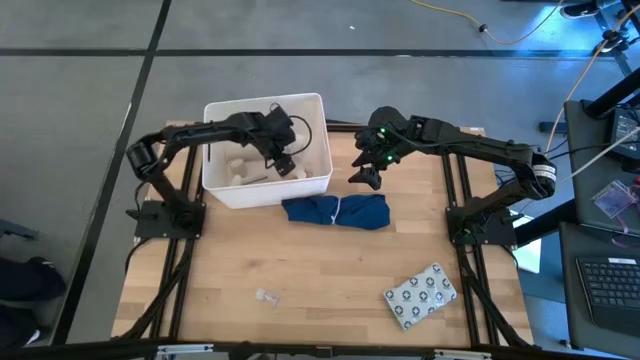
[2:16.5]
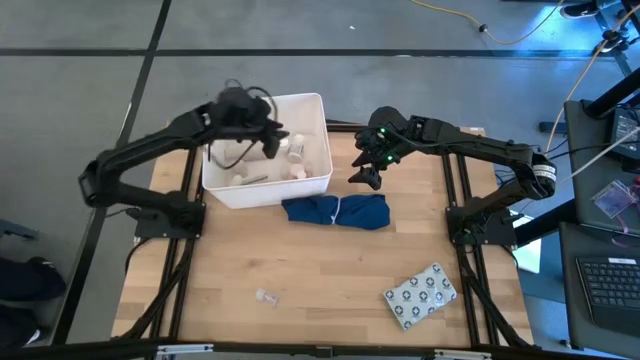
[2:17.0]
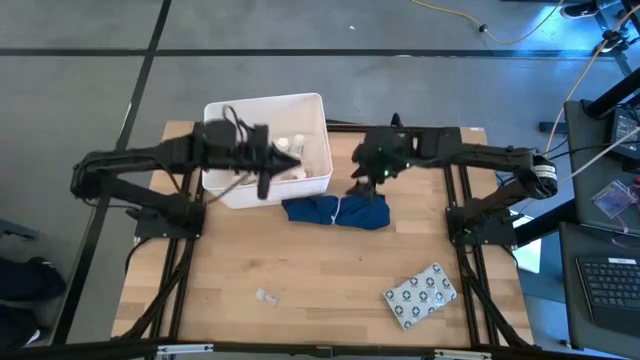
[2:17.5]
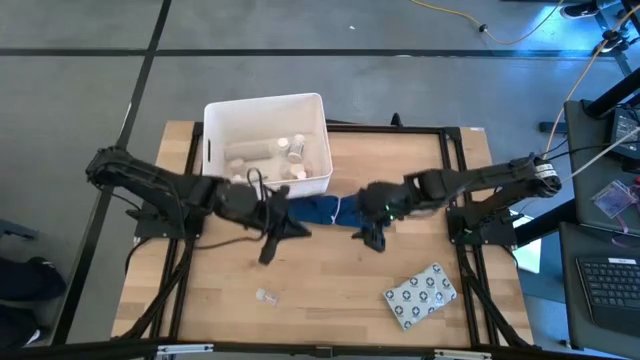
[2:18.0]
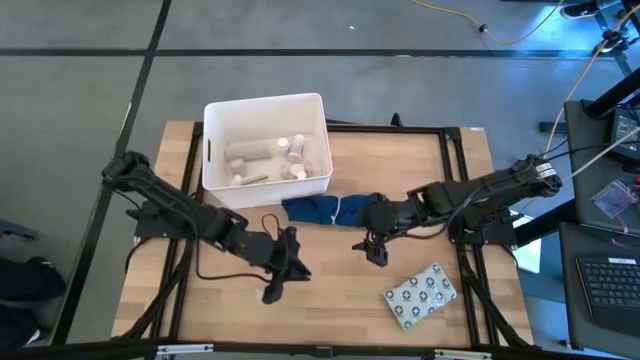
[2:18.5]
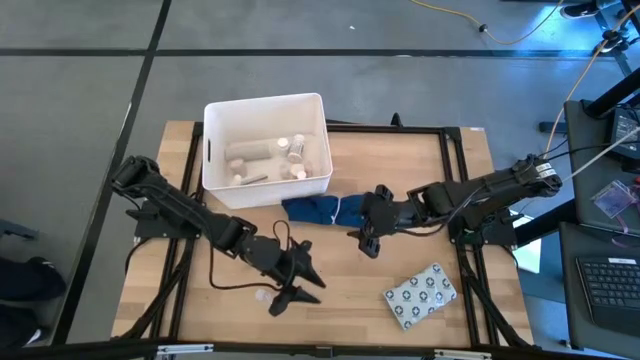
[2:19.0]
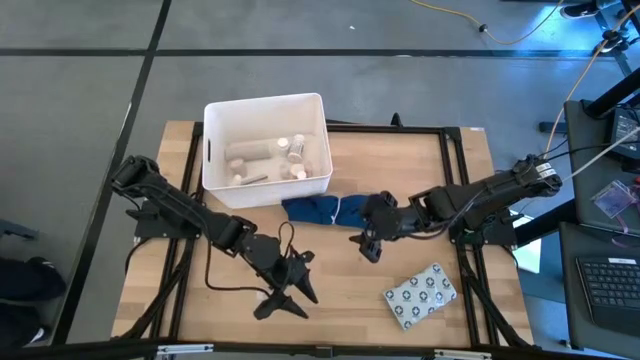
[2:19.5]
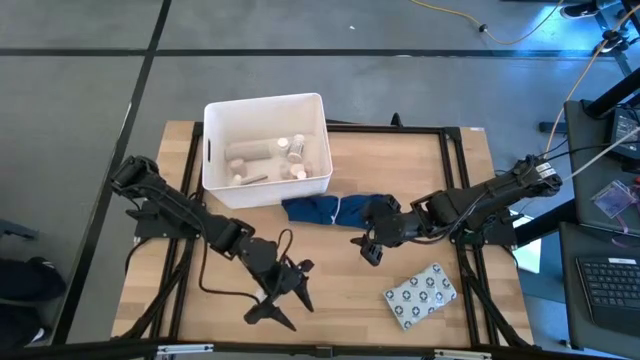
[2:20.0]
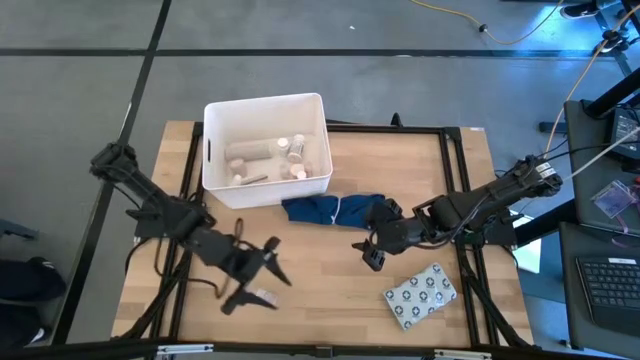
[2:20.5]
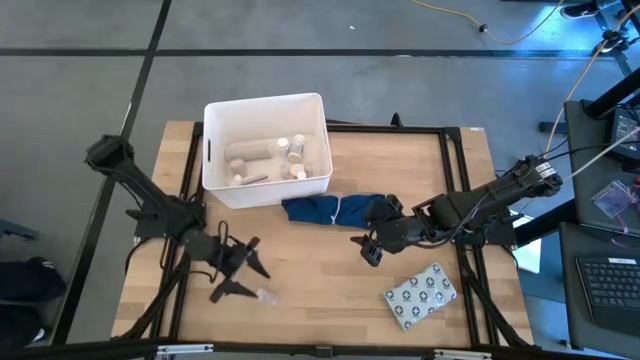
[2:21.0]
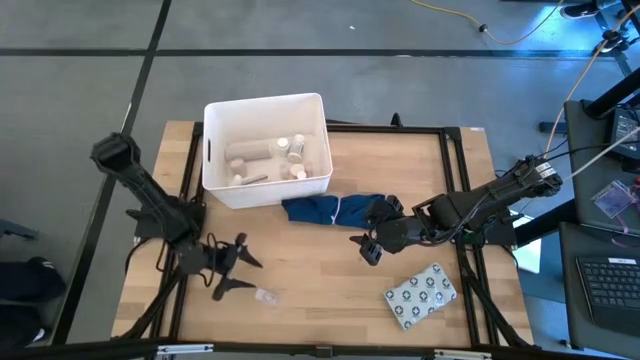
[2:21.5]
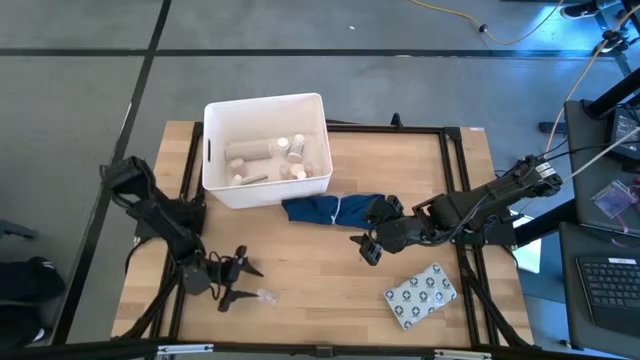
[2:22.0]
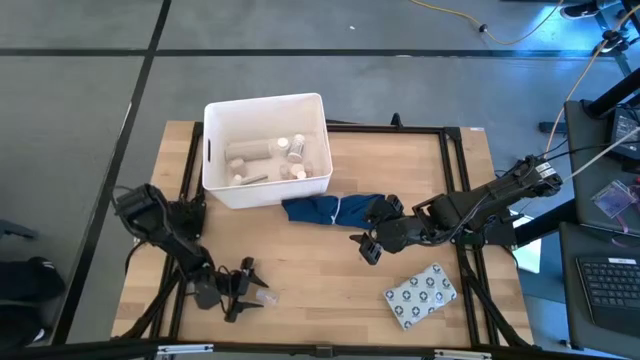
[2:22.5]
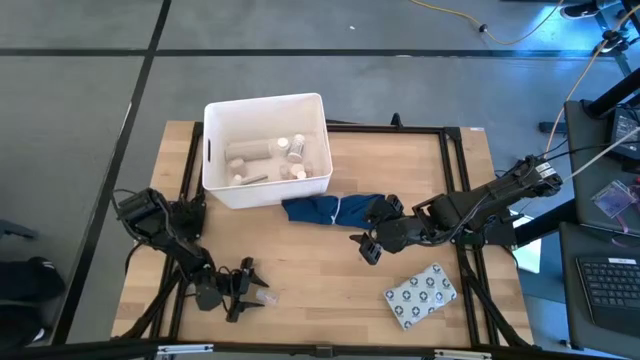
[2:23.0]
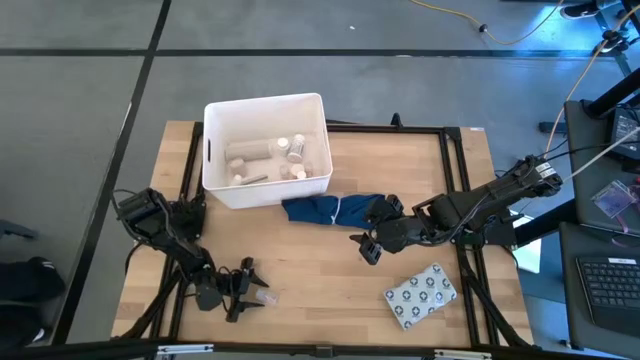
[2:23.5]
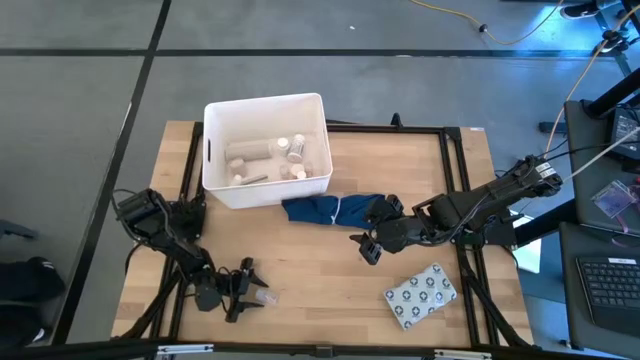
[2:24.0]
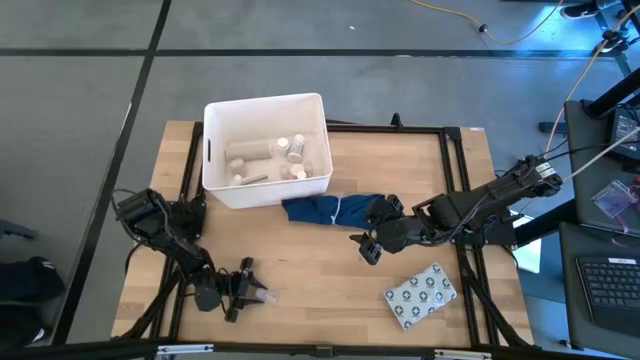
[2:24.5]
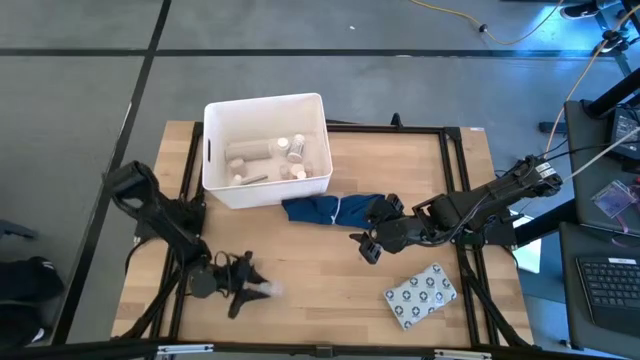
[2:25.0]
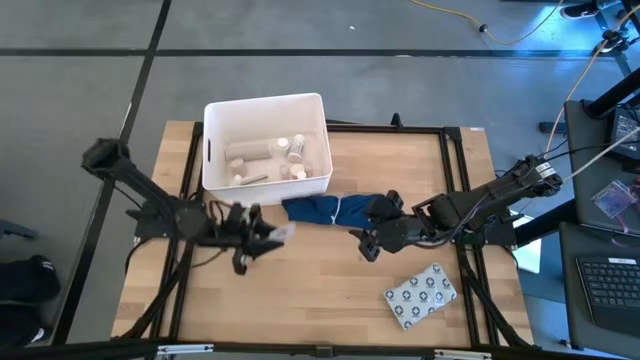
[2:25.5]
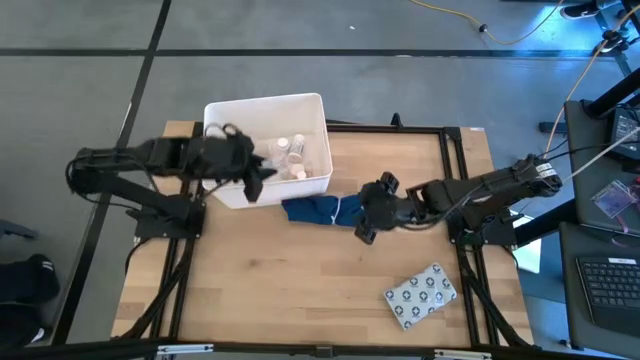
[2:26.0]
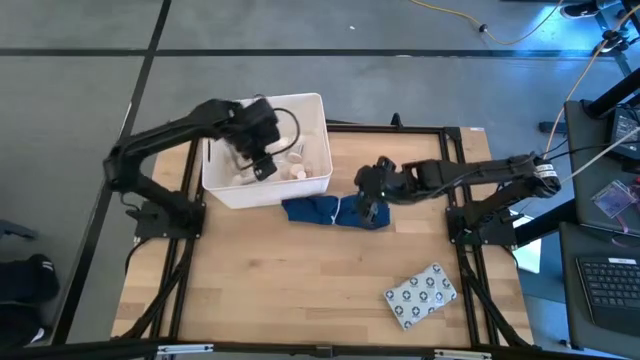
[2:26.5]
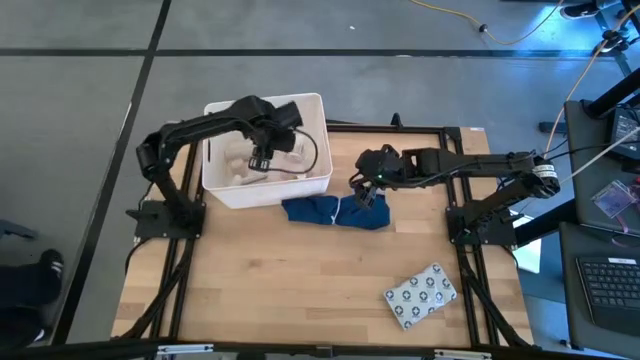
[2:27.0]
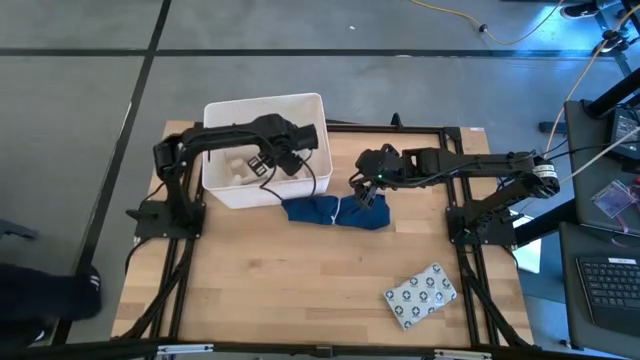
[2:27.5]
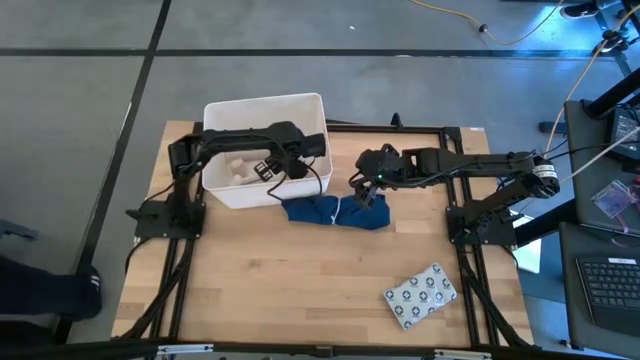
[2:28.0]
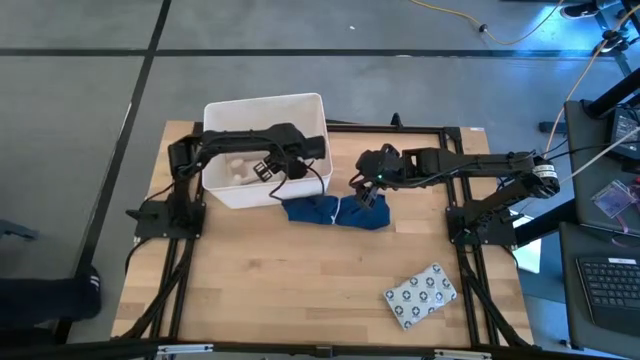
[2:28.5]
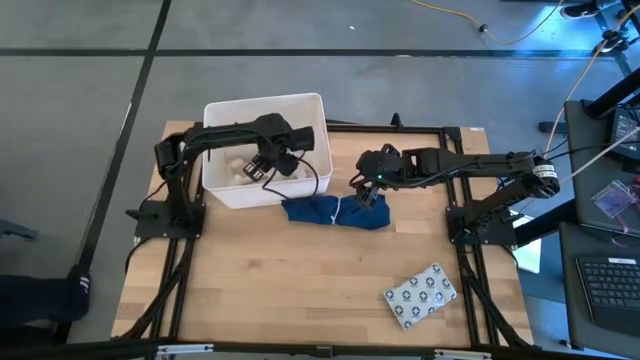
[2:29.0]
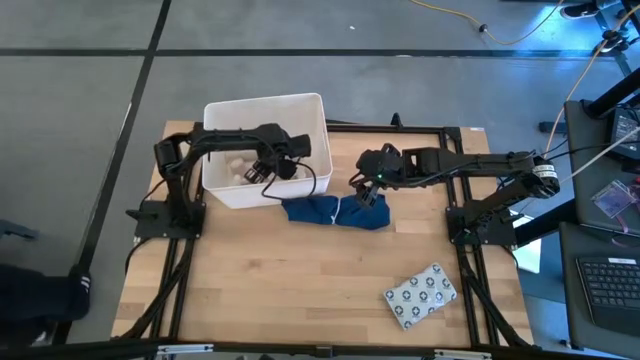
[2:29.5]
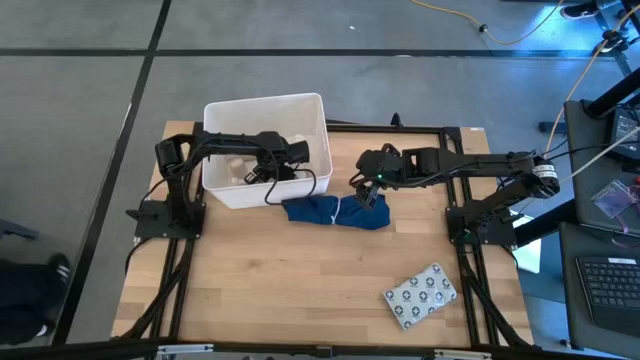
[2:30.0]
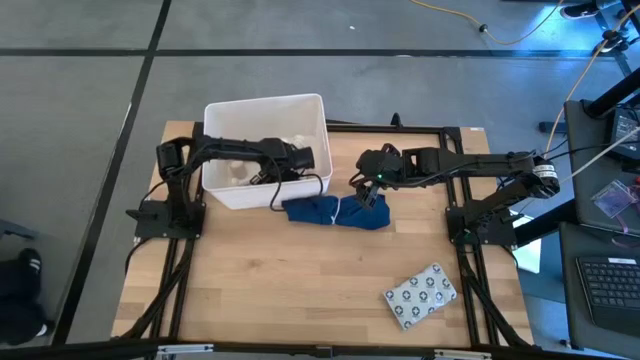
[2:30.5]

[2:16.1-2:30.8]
Task: Pick & place medical supplies in basket/bin
Put the transparent pill bottle into the white container

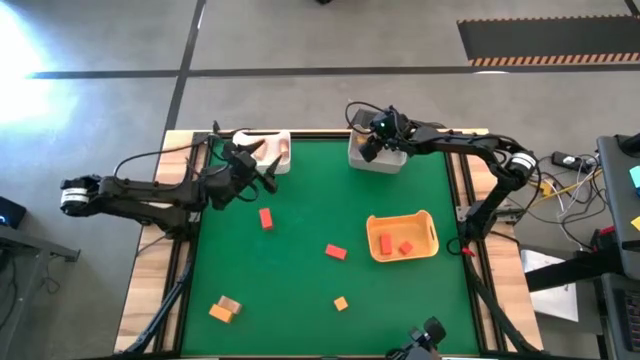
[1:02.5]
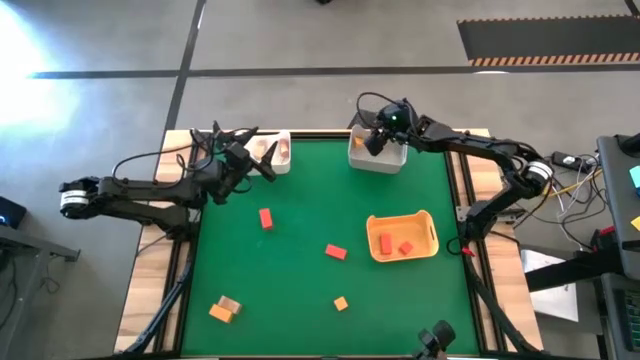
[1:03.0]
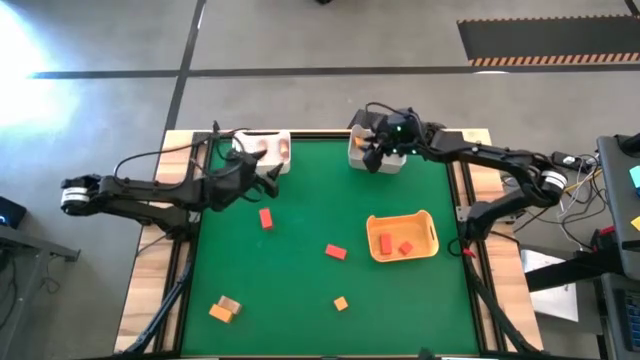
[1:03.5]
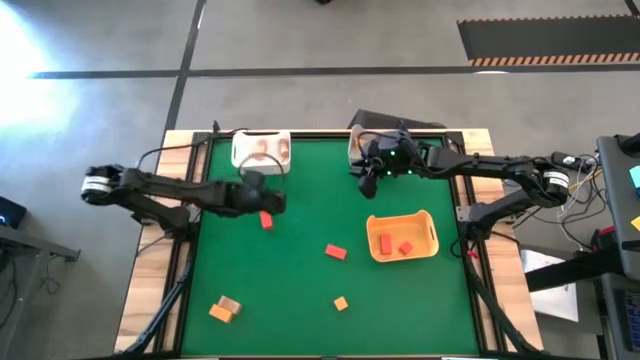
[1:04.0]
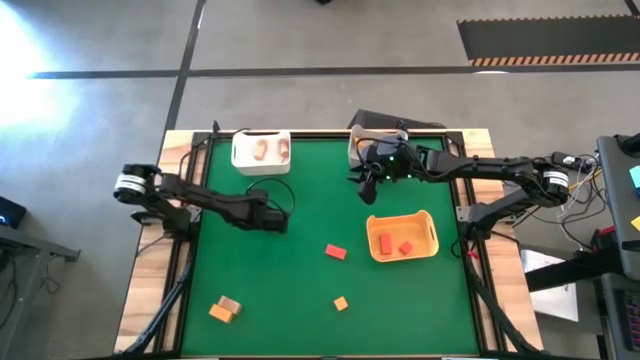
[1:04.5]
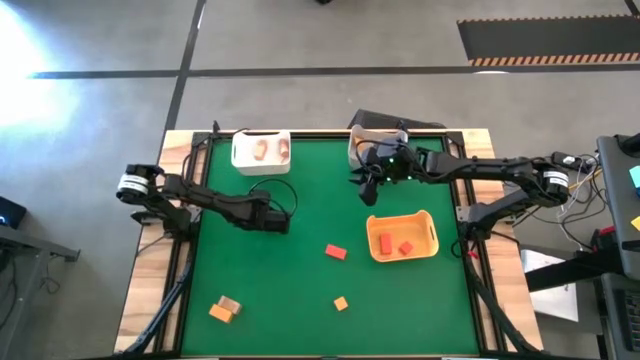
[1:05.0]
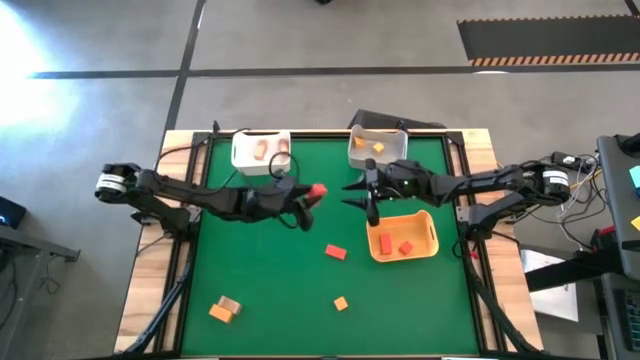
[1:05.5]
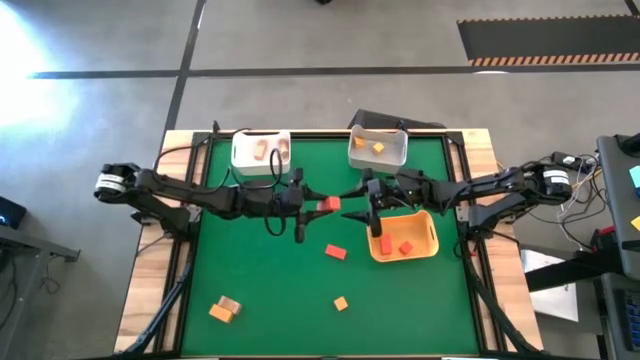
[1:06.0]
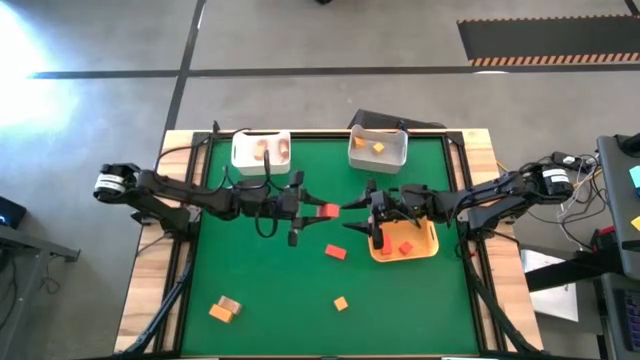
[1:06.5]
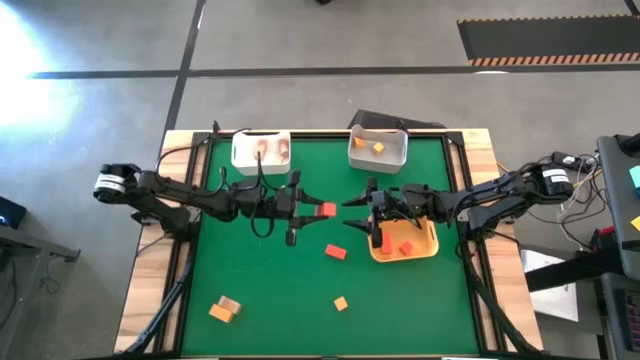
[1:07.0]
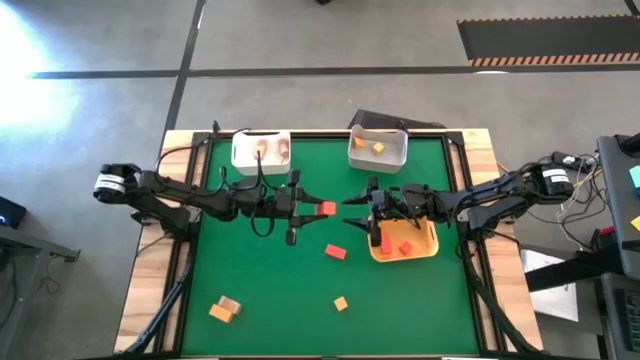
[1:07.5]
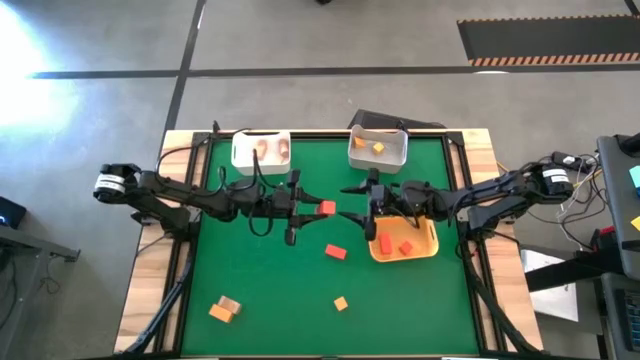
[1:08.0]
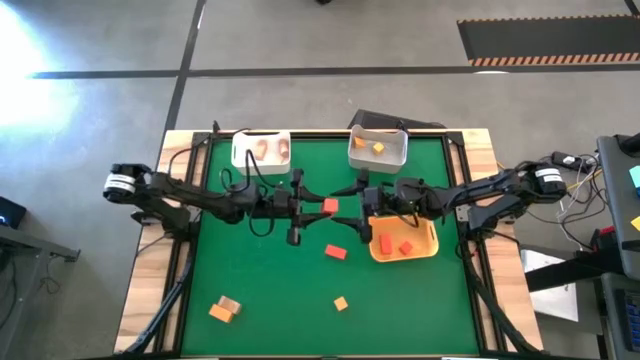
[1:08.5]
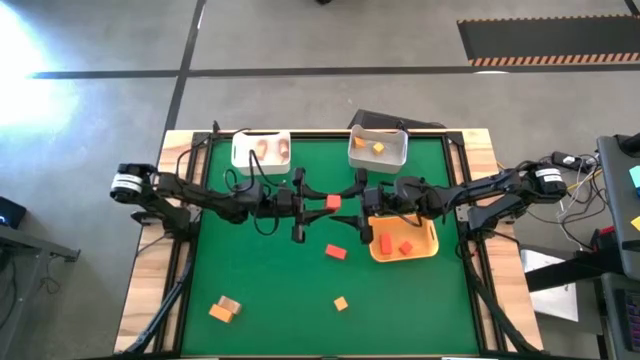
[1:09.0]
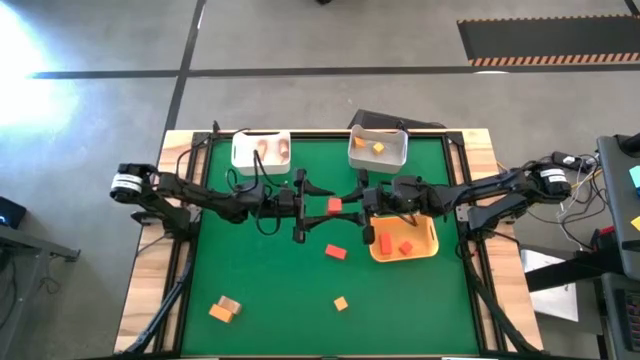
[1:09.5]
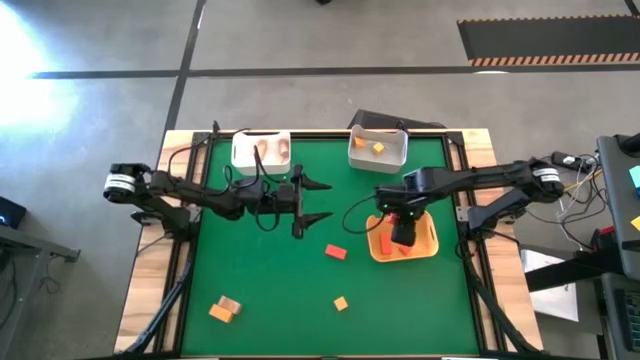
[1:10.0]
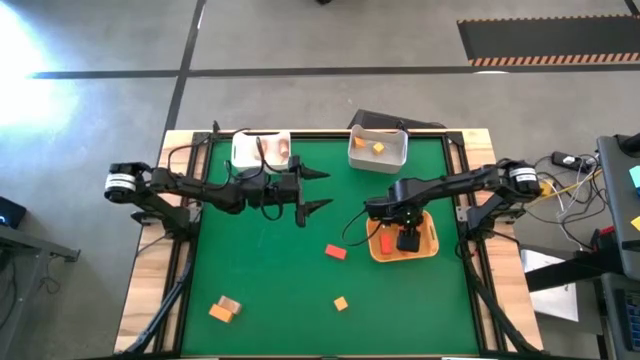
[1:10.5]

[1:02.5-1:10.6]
Task: Sort & place blocks by color
Put the orange block into the yellow bin
